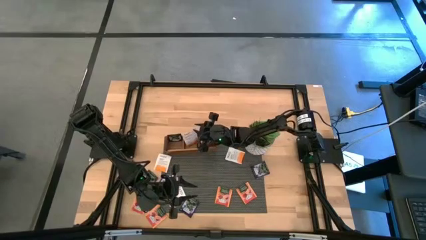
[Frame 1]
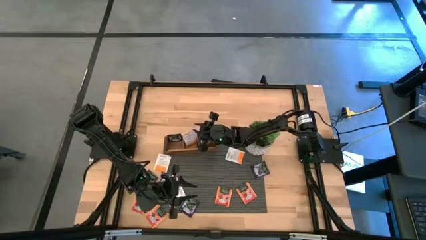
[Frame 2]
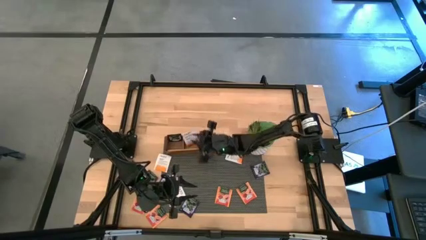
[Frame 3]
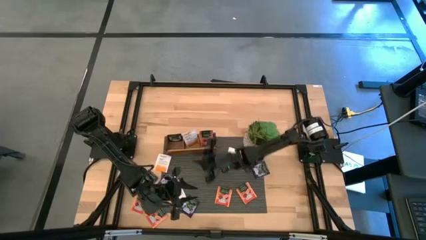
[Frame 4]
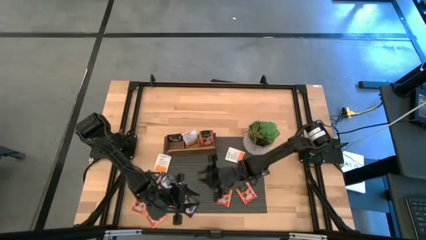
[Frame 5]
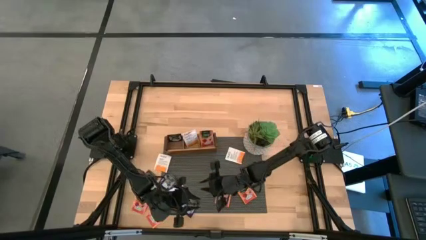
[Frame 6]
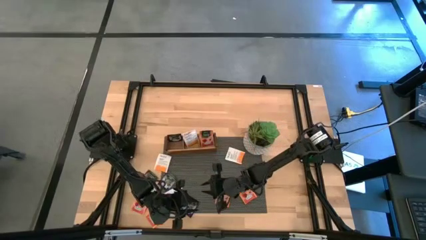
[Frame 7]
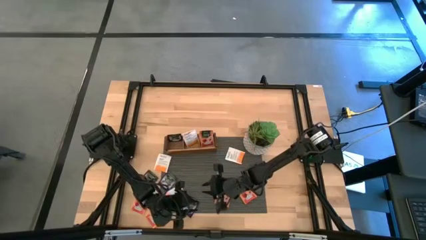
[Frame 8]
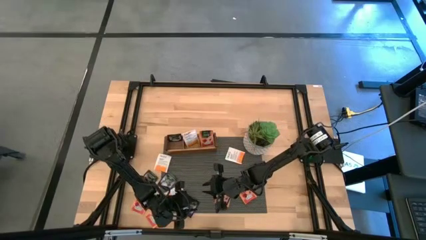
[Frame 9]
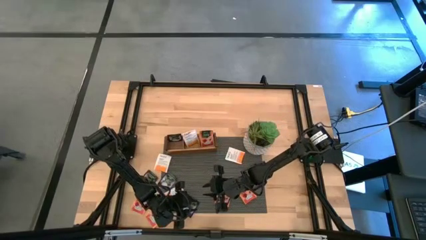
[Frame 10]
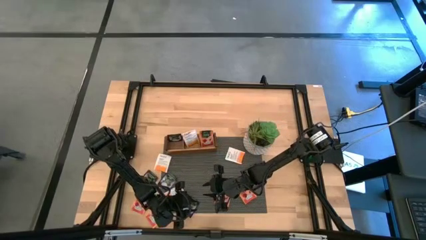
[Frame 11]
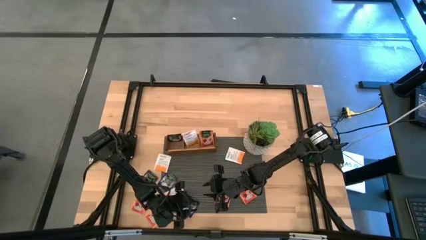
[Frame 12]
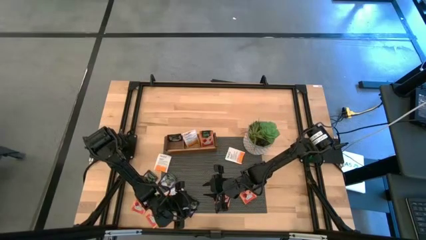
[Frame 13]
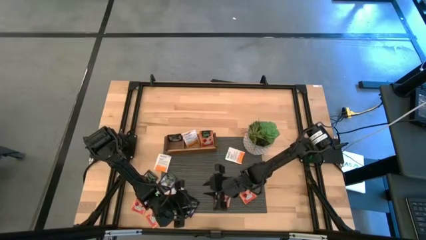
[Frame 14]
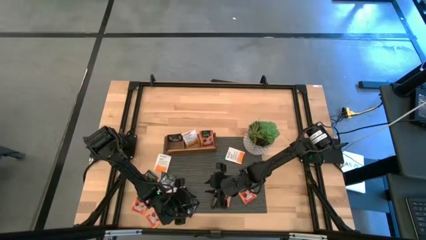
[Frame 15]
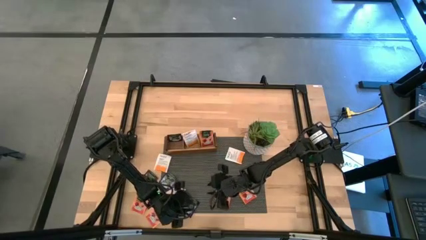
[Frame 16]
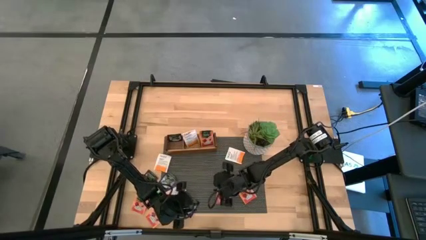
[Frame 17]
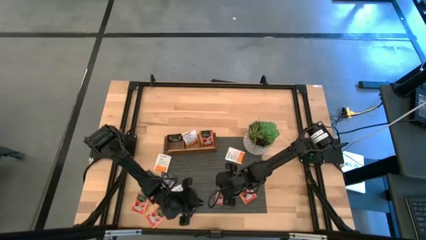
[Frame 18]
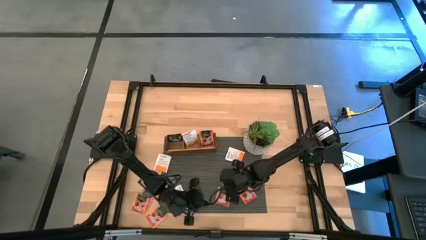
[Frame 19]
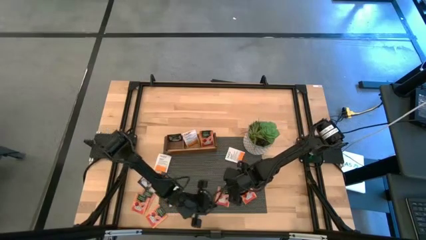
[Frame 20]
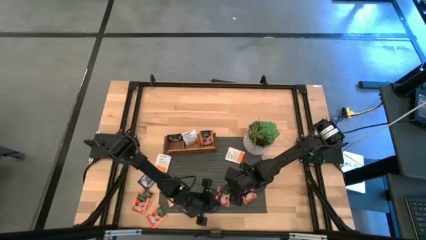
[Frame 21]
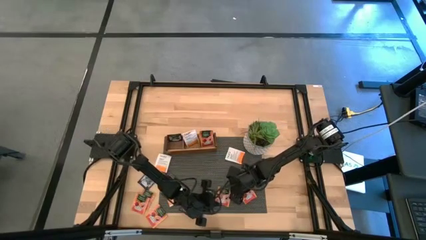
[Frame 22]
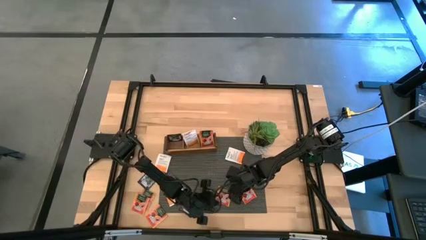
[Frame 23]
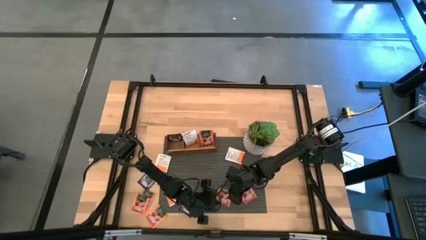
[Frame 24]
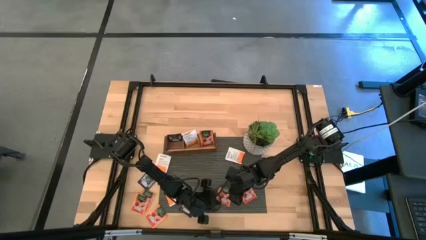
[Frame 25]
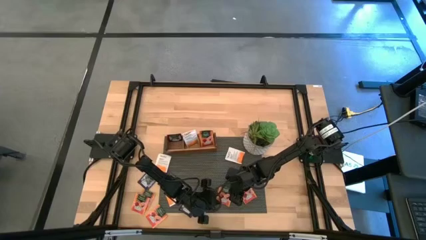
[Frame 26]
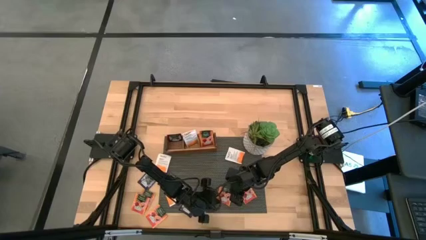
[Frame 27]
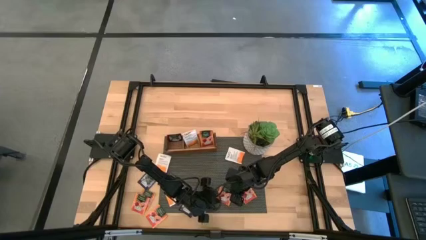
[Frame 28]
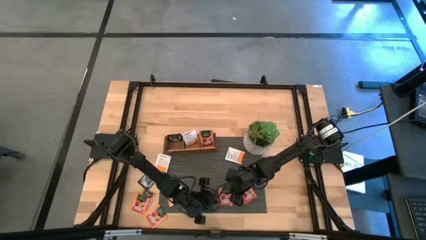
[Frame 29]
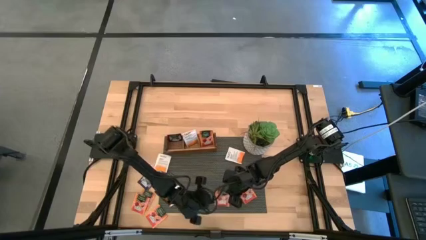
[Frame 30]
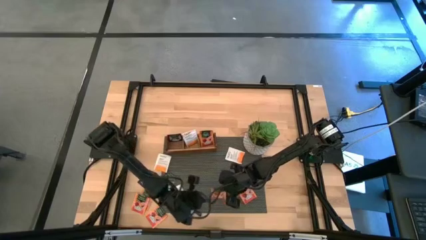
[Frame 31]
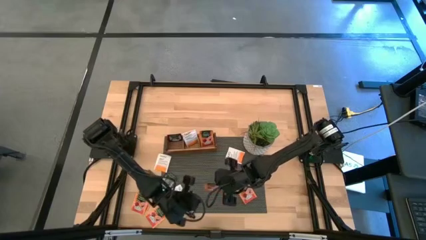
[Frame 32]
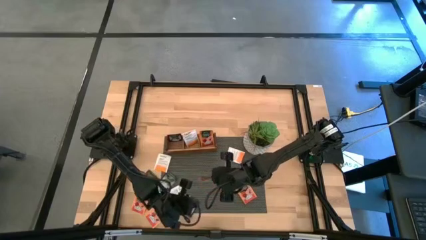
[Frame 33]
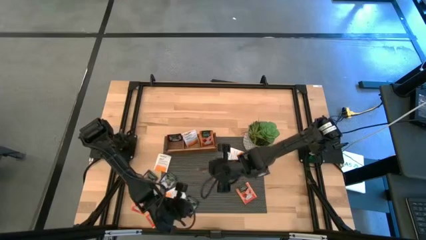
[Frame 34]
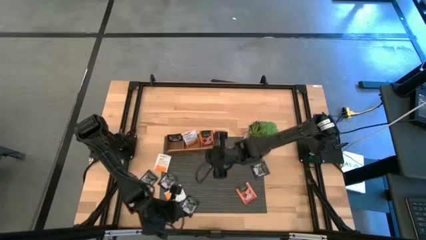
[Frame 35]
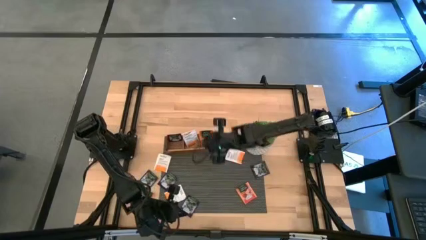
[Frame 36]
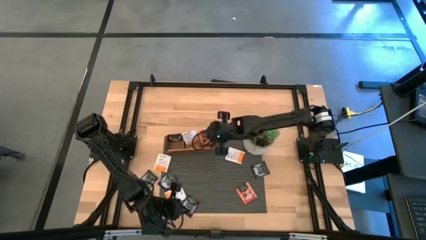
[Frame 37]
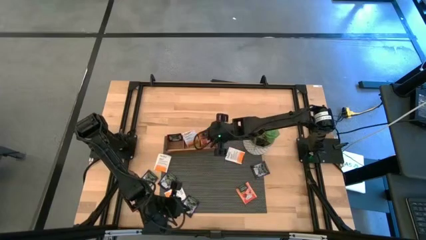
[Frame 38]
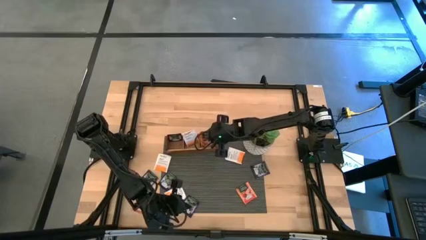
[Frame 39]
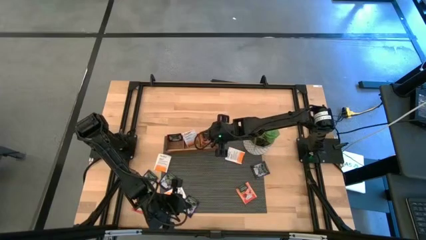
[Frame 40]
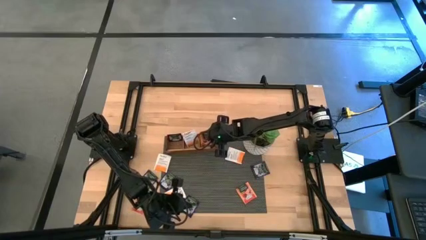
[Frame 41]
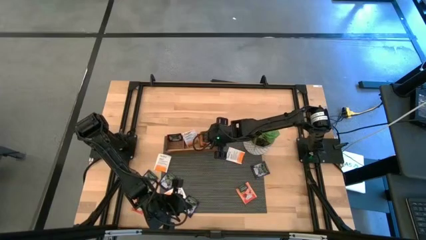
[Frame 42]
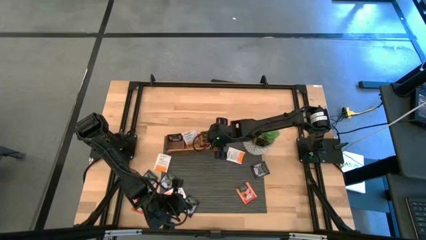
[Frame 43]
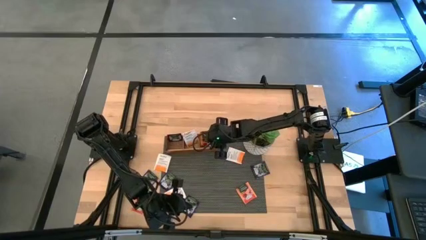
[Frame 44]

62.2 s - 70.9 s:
Task: Pick & Place Tea
Put the orange tea bag to the right section of the wooden organizer

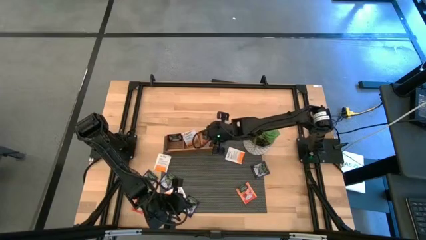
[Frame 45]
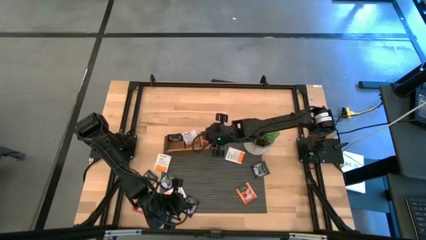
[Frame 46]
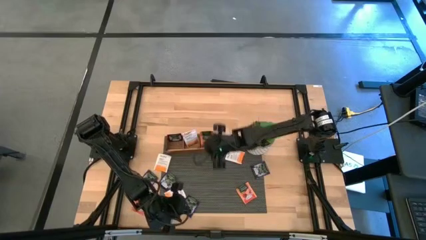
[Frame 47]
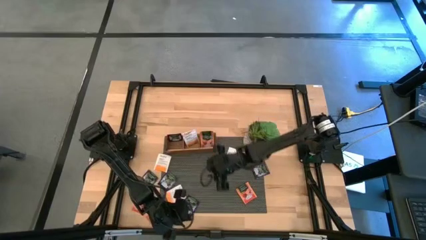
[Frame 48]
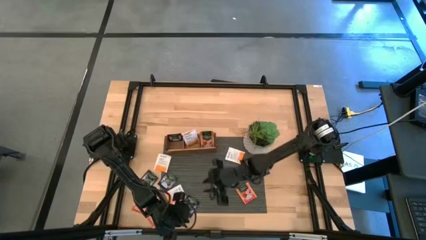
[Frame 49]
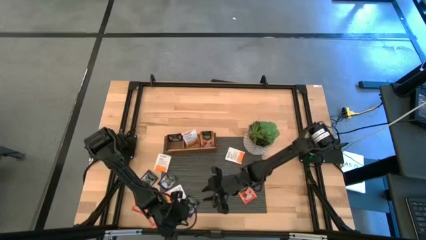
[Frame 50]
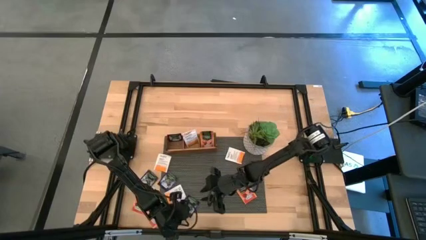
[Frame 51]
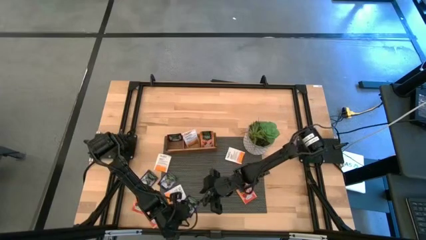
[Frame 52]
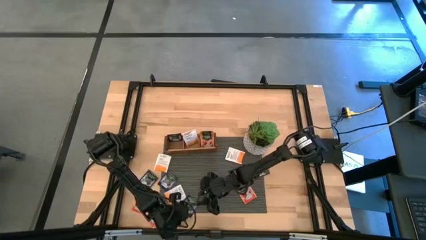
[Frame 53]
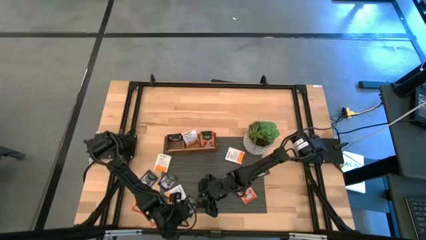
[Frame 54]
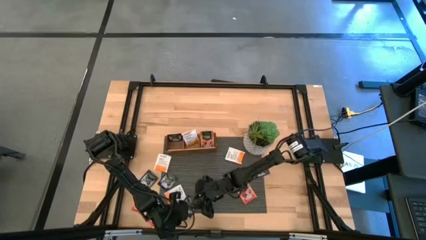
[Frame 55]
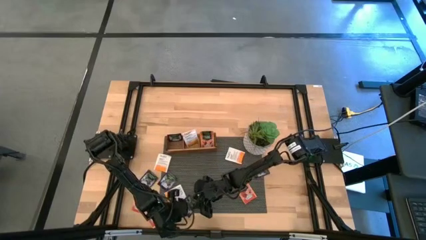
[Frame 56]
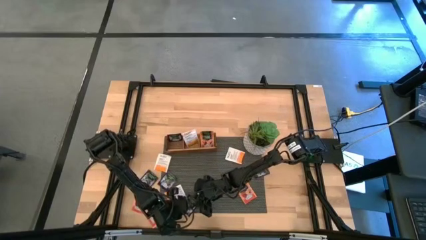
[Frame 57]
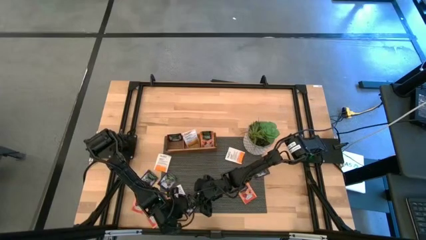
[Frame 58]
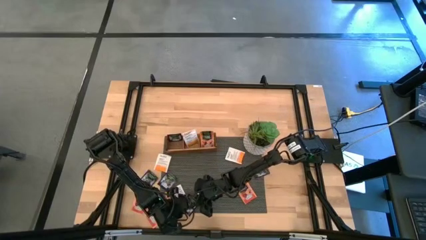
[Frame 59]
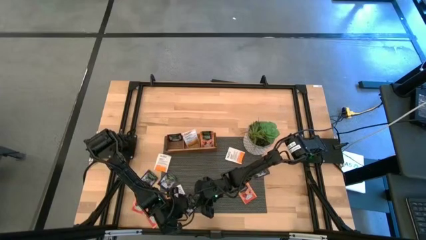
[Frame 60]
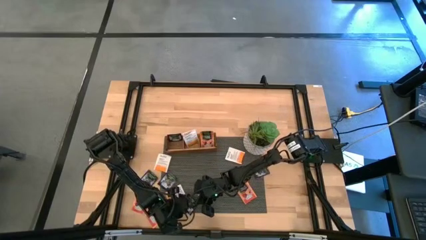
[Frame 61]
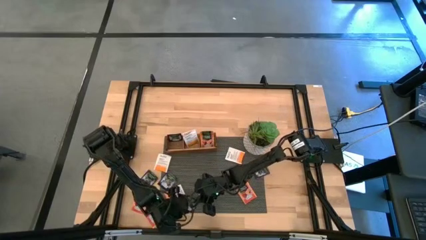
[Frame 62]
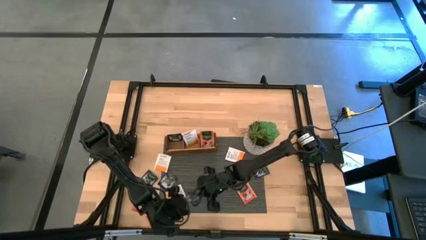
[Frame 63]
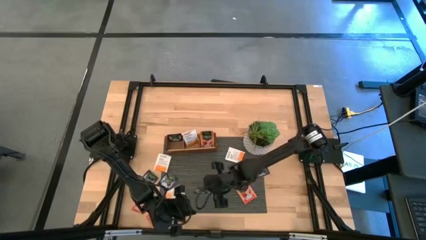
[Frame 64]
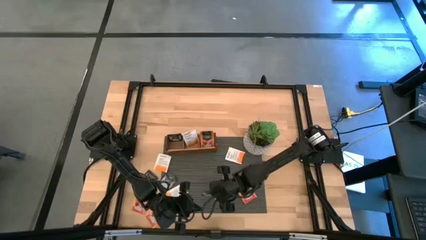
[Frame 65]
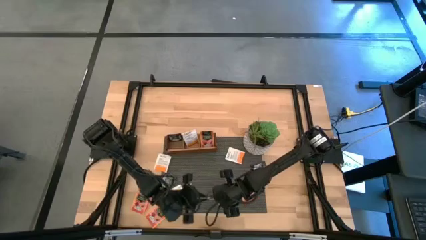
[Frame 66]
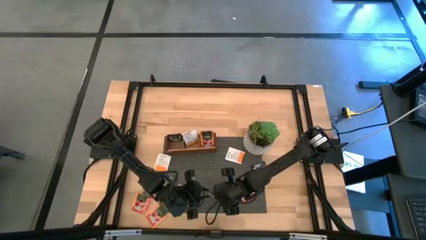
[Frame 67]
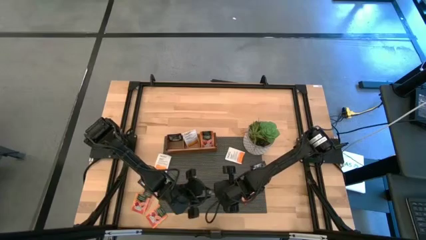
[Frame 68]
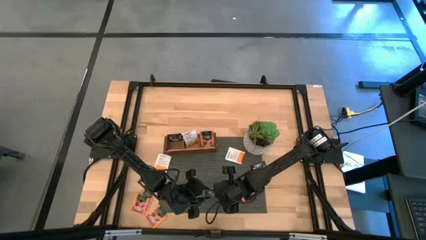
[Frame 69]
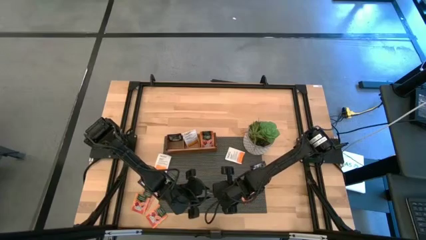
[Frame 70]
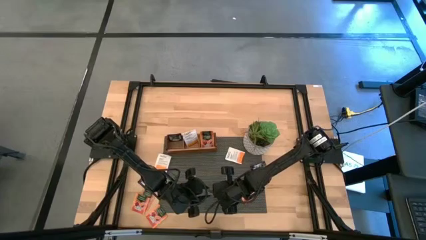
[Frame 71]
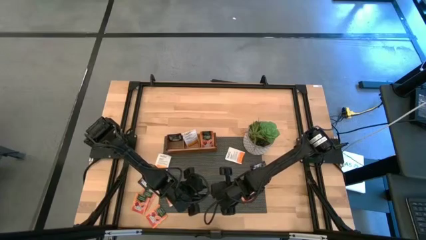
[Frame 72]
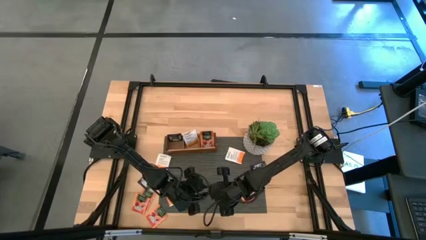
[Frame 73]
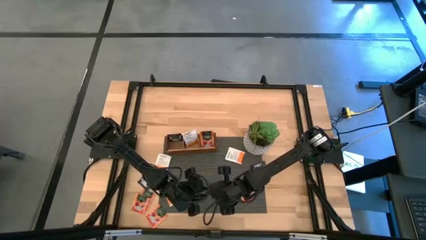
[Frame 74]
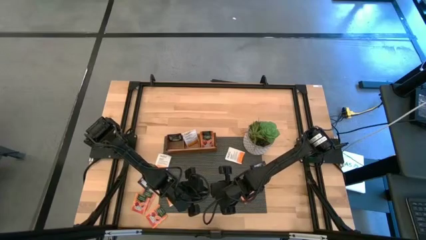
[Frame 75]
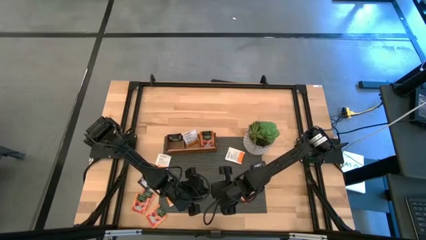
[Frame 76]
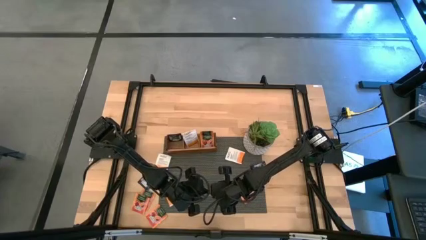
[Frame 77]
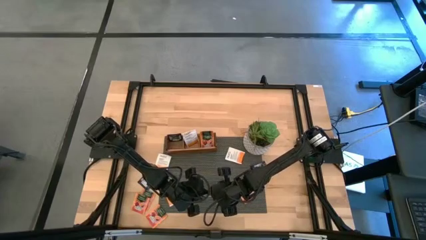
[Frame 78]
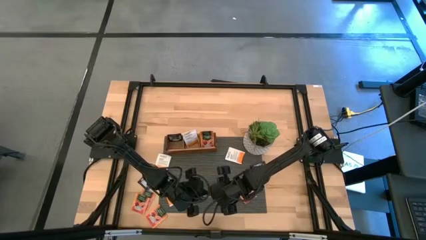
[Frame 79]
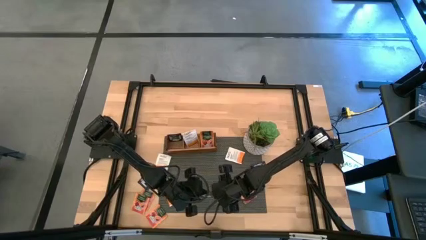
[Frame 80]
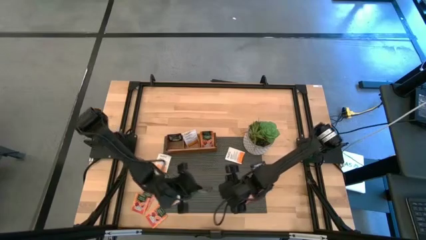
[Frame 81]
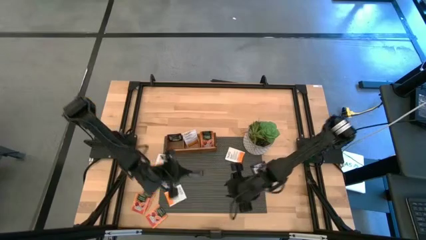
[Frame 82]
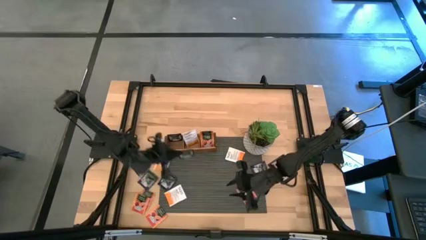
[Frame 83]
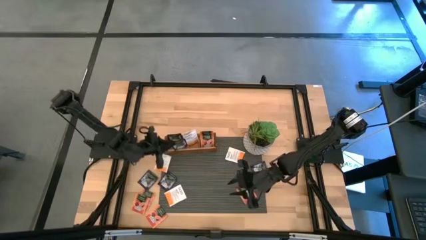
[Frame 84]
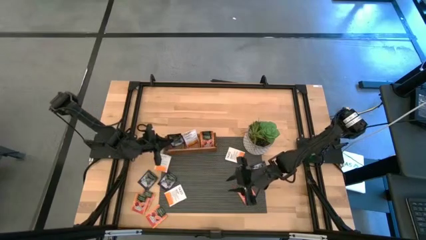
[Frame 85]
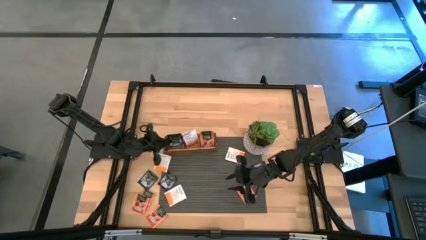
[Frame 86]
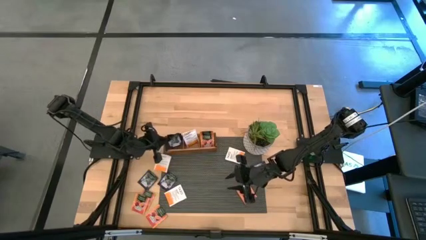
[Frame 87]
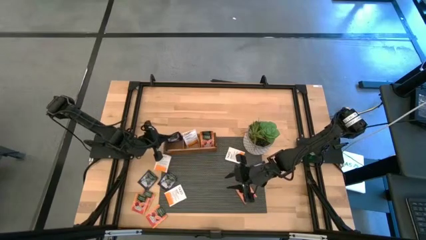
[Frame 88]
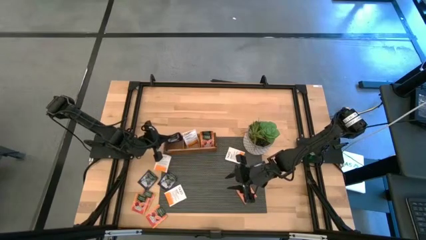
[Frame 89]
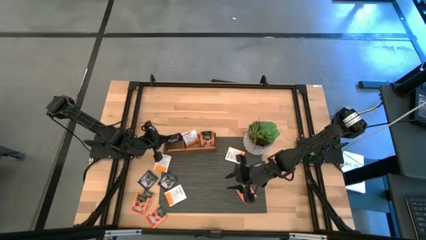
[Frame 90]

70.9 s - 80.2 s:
Put the violet tea bag to the left section of the wooden organizer
